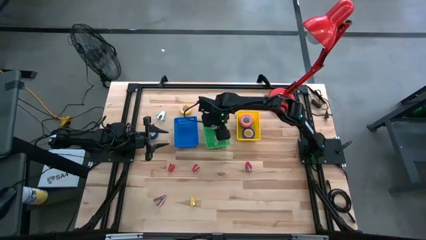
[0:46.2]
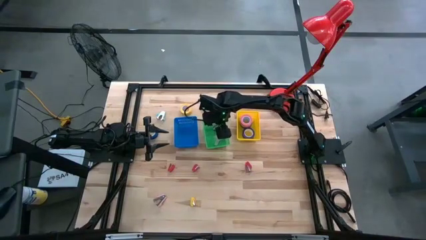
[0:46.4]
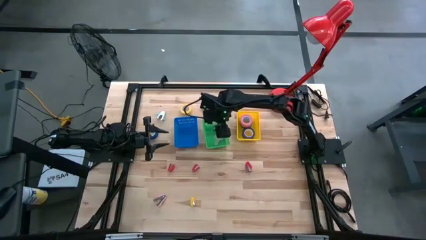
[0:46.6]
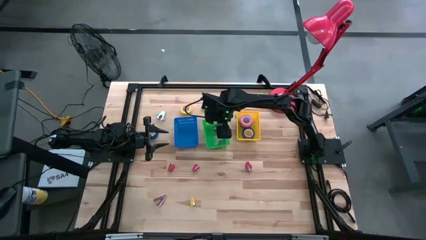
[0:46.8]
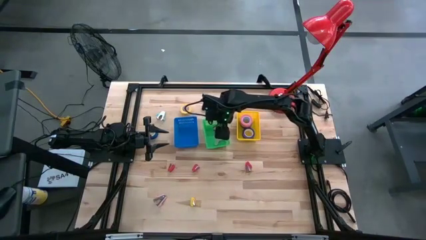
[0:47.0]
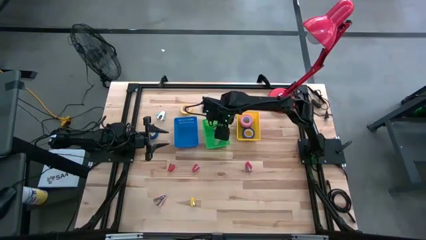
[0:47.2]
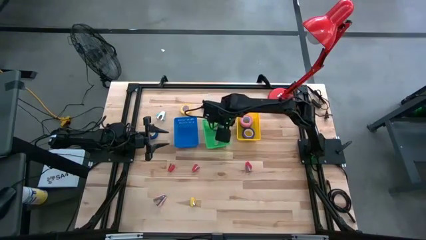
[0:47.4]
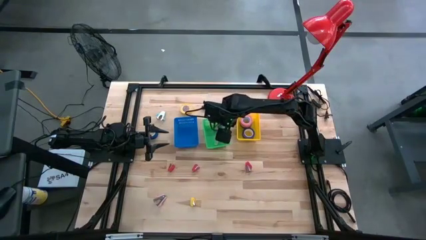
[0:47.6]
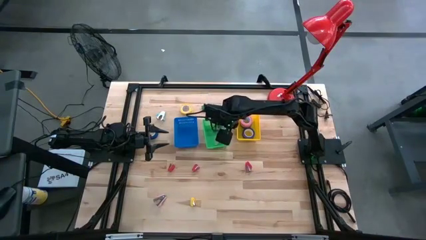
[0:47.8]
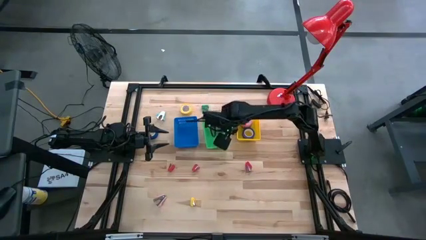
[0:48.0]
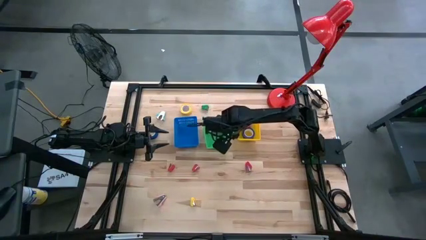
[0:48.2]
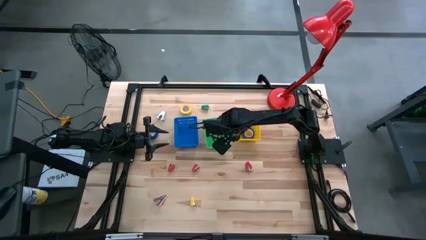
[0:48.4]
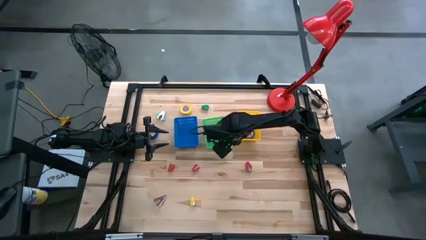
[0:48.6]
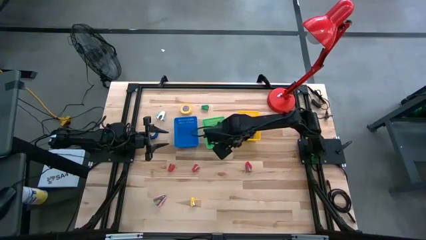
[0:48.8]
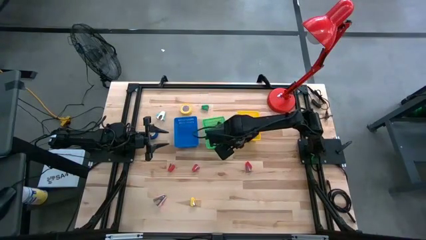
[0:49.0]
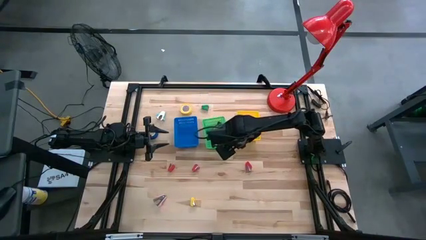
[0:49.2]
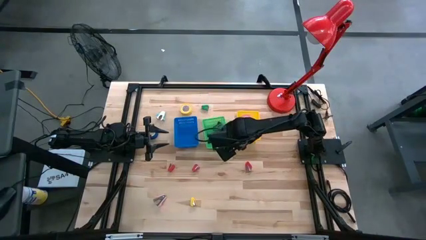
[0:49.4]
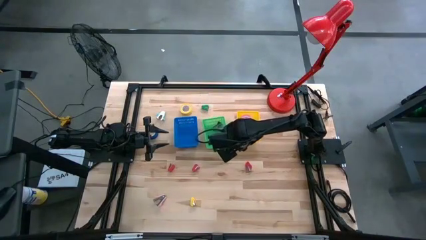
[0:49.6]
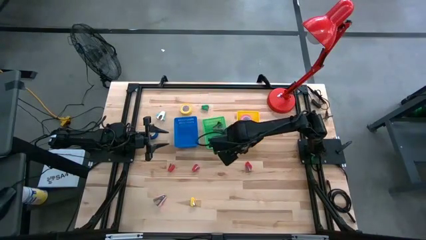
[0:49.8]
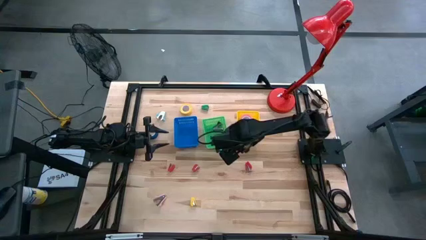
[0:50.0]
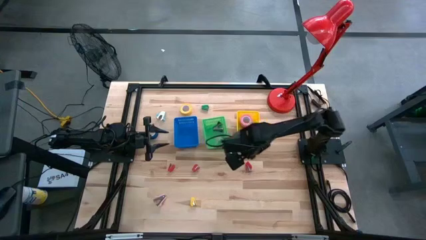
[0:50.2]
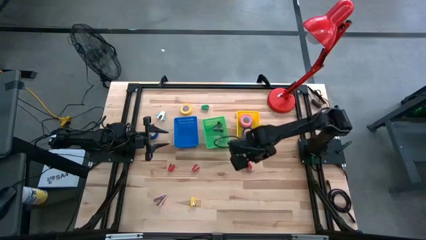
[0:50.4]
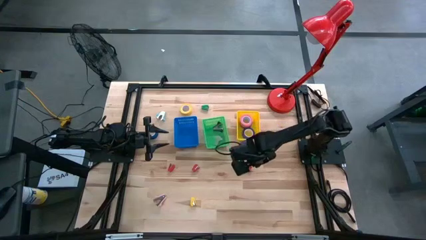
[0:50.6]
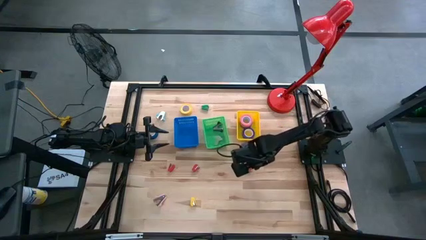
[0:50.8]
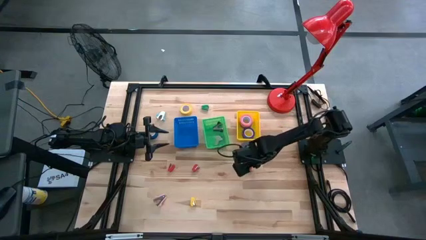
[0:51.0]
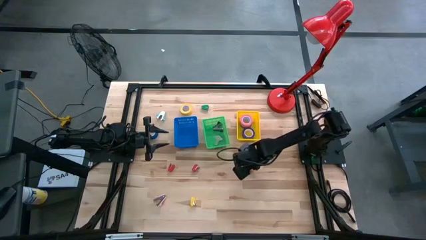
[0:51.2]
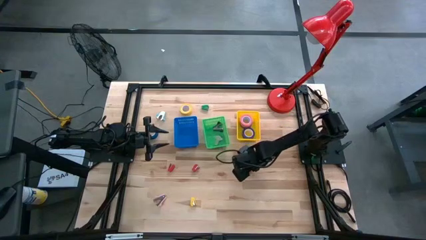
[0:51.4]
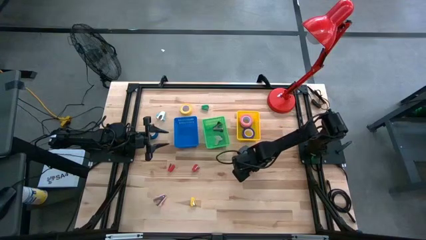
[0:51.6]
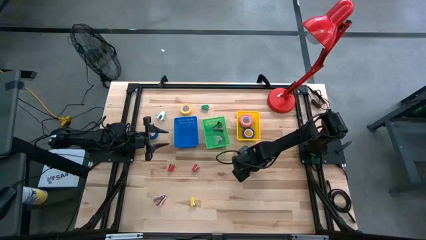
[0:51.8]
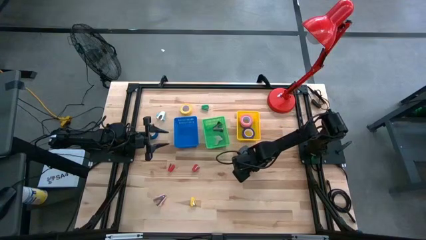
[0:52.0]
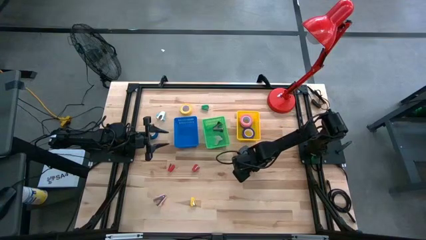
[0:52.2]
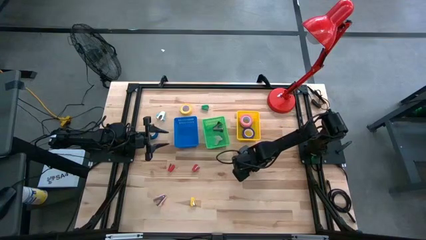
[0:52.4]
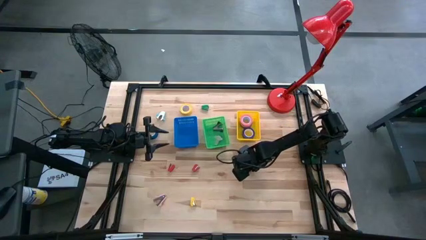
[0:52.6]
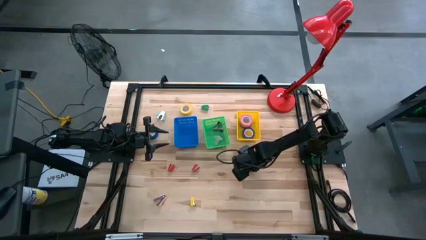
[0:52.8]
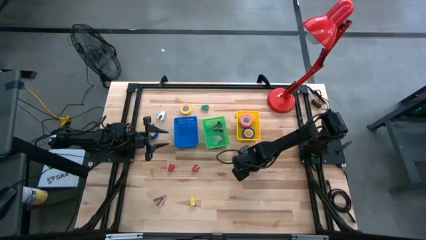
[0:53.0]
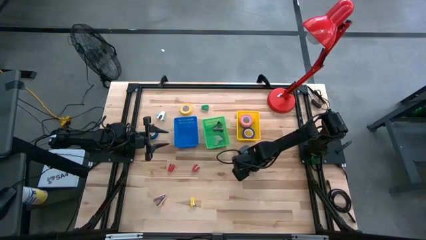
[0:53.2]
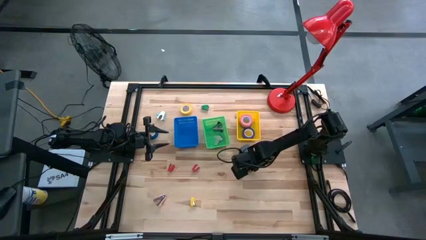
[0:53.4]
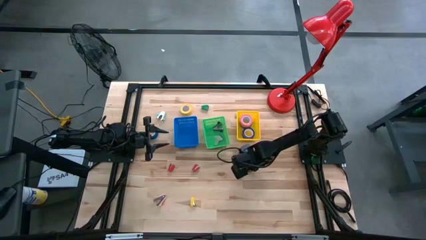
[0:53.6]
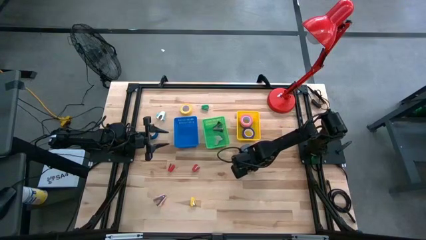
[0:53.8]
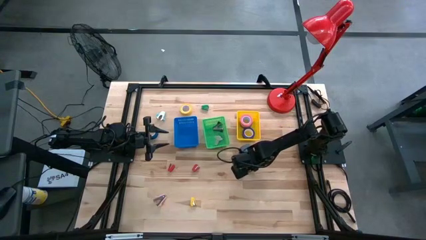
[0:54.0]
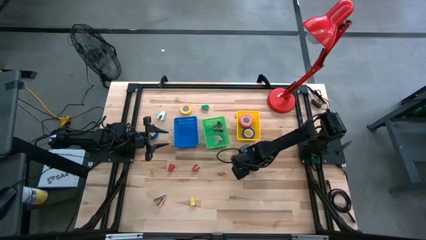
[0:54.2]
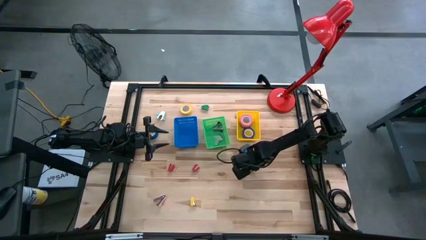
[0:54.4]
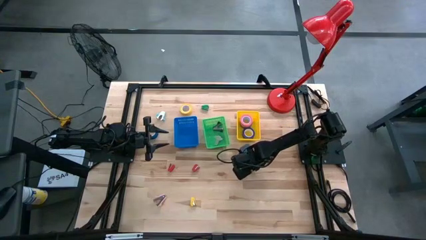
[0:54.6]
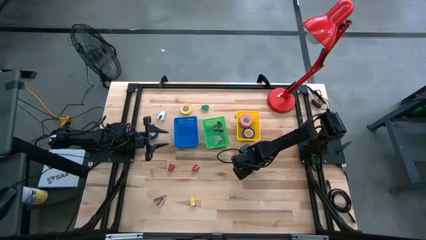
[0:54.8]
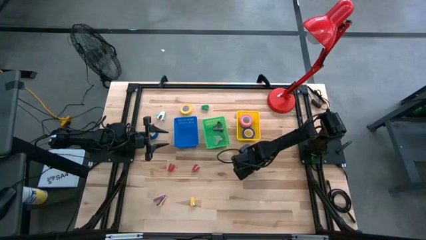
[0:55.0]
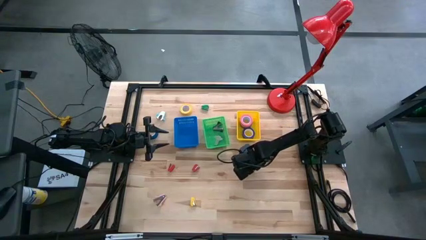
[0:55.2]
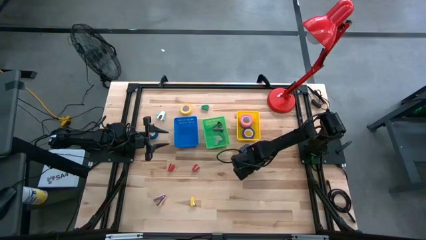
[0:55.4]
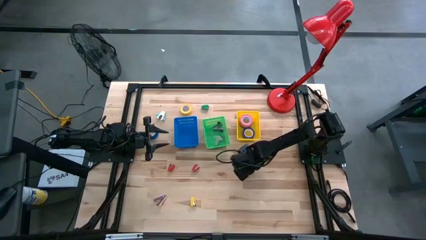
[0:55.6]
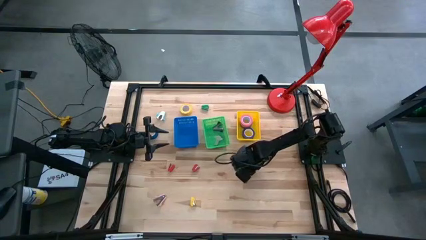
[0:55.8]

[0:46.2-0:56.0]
Task: Pick and place Stapler, Stapler remover, tape
Put the right red stapler into the blue bin

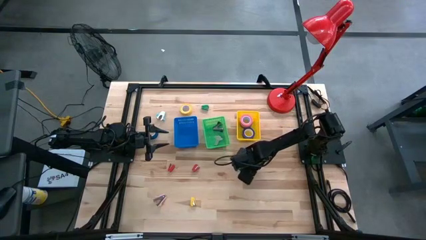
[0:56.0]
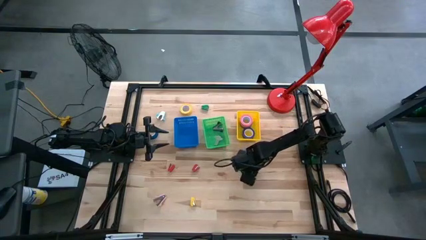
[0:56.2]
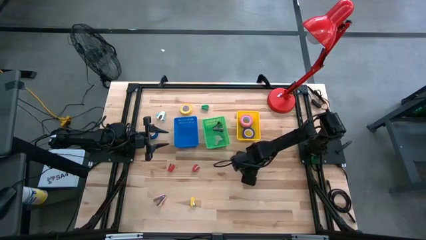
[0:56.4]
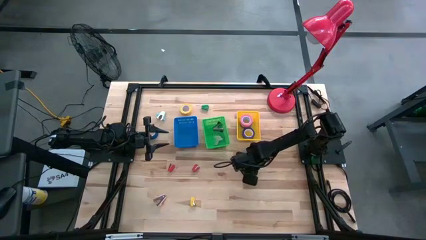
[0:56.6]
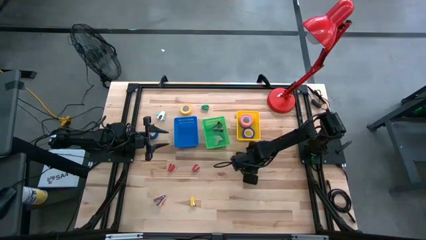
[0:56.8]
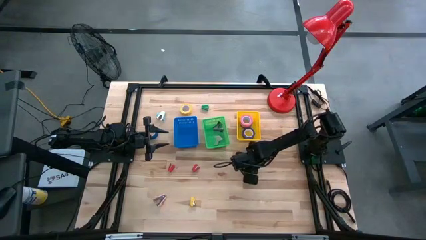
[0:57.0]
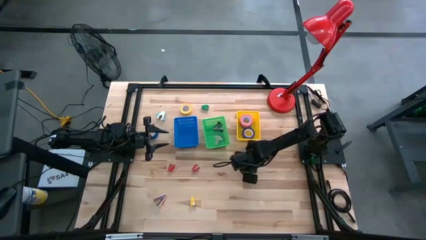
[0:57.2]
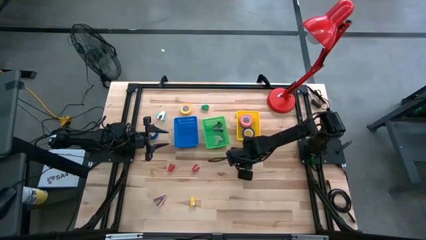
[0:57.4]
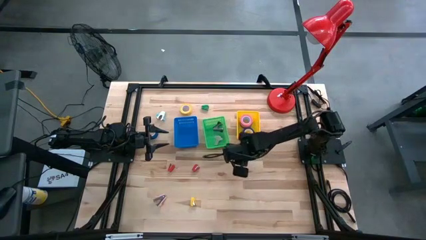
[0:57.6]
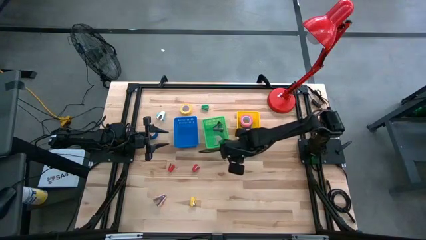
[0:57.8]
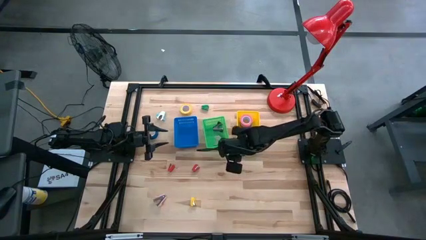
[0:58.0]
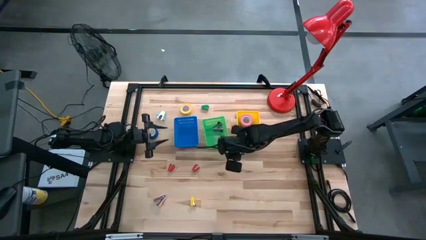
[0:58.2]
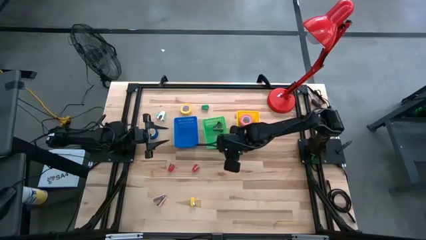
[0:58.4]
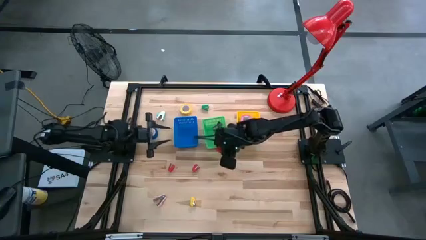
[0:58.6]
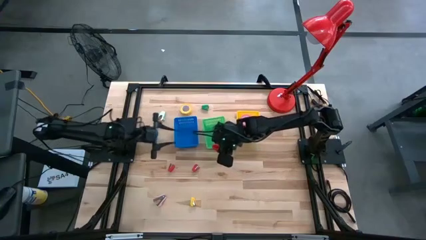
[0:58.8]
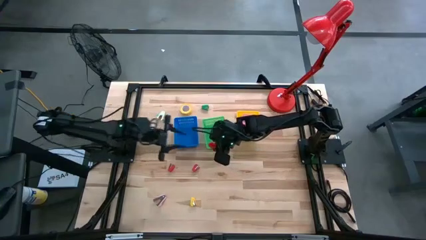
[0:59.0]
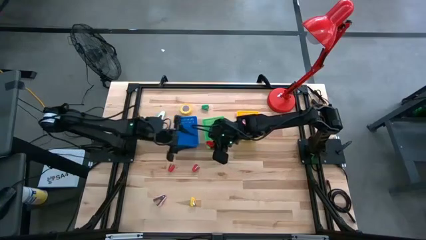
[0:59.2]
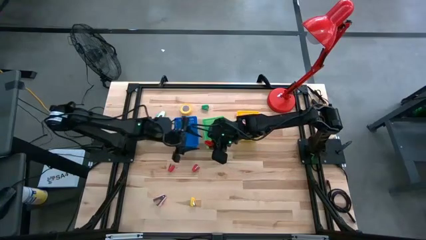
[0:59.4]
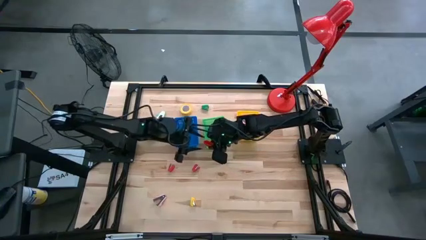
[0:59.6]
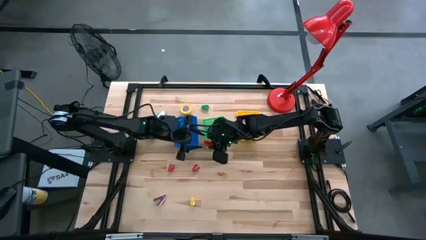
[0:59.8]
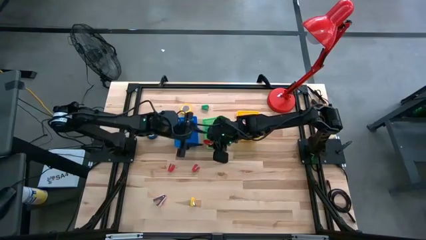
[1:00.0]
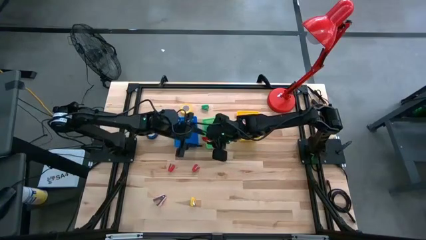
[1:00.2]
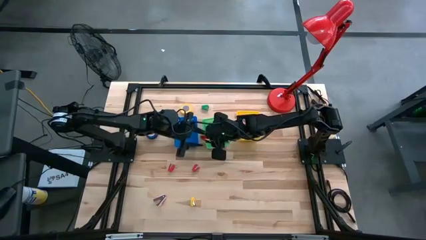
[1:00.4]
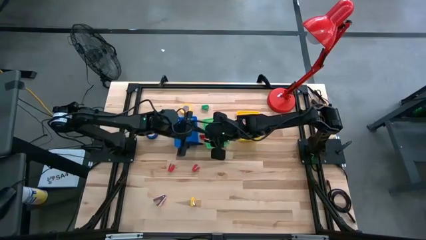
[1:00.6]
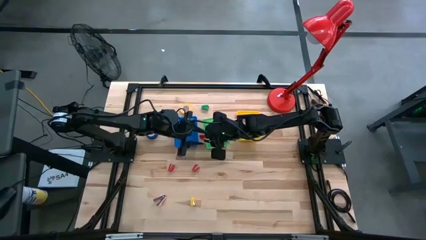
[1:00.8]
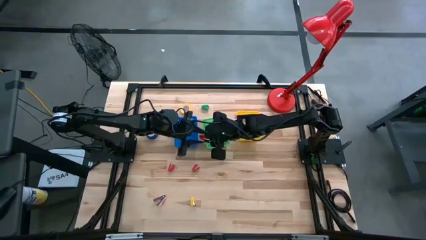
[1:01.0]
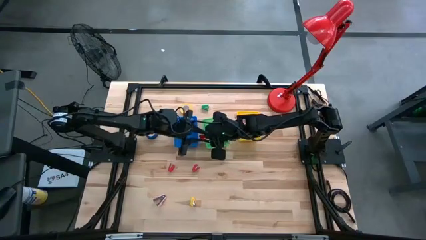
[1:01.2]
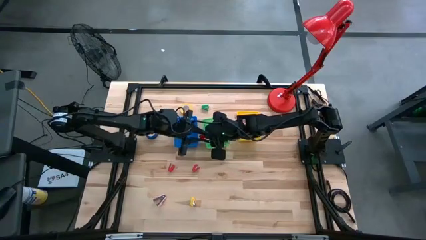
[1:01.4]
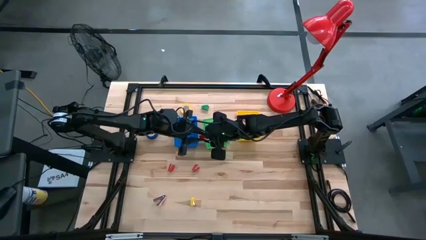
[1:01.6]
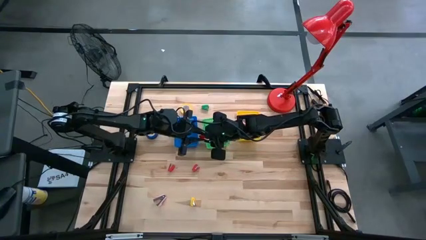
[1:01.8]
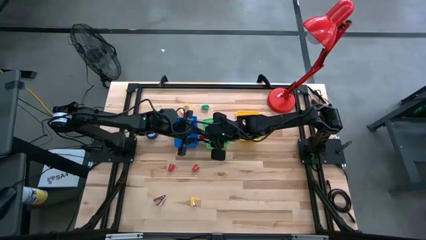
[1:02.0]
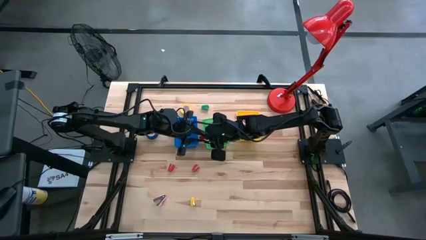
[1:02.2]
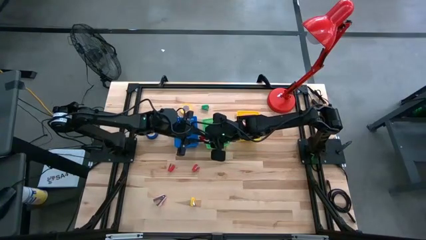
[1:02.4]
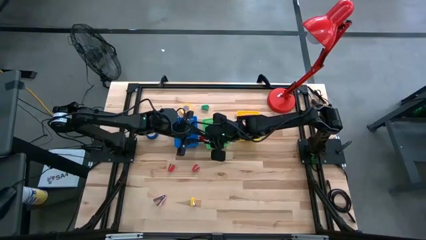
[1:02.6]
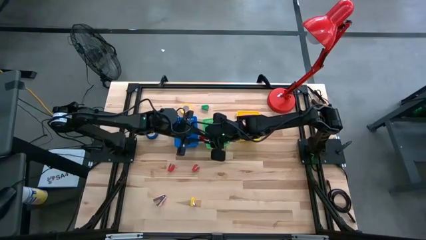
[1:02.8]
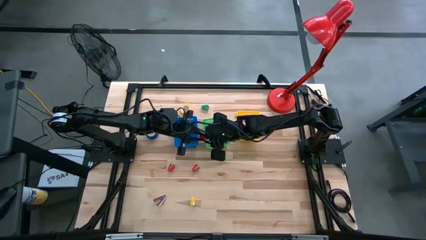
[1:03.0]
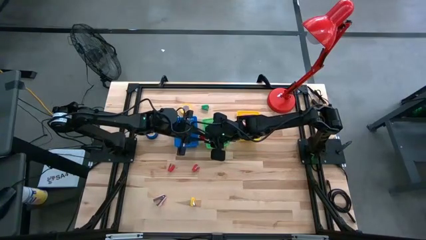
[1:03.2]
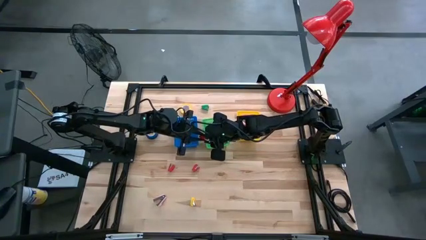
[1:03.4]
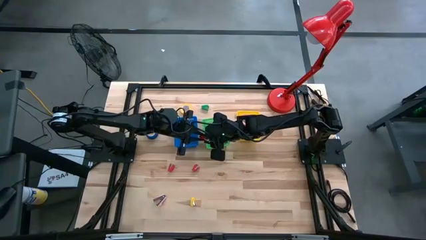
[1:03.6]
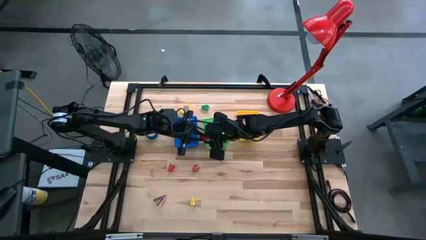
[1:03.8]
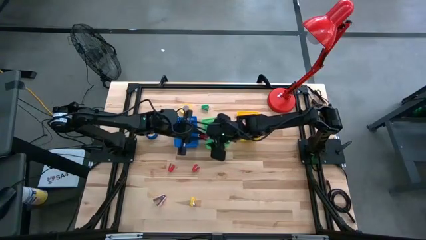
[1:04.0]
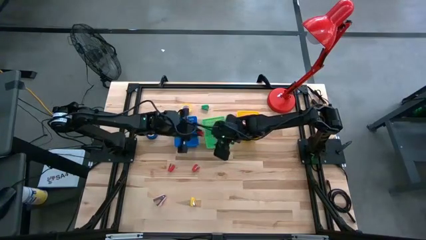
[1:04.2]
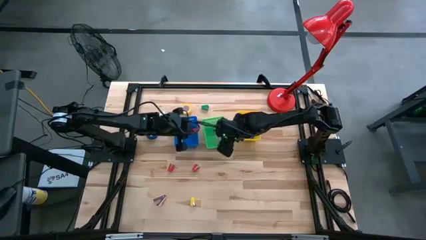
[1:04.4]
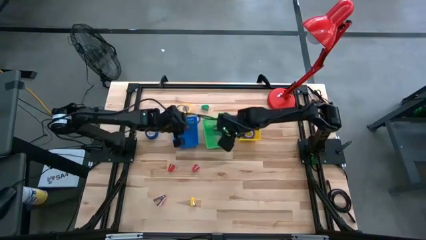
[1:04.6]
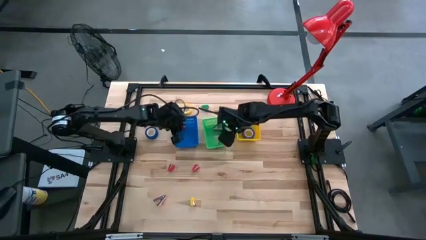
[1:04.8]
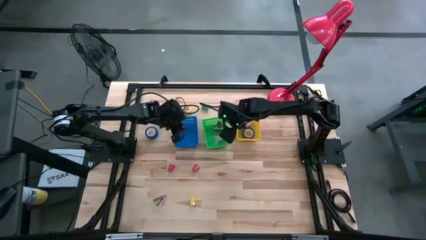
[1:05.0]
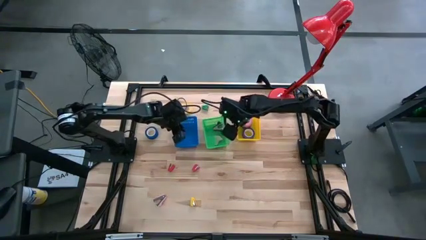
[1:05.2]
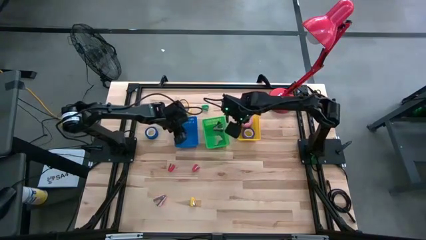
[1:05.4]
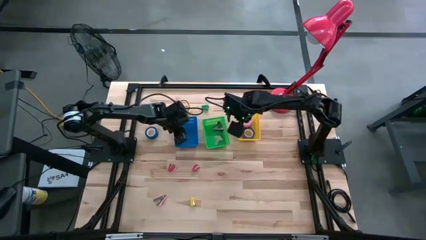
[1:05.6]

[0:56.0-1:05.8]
Put the right red stapler into the blue bin
